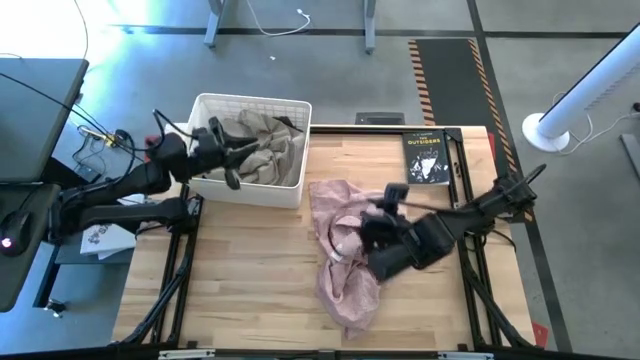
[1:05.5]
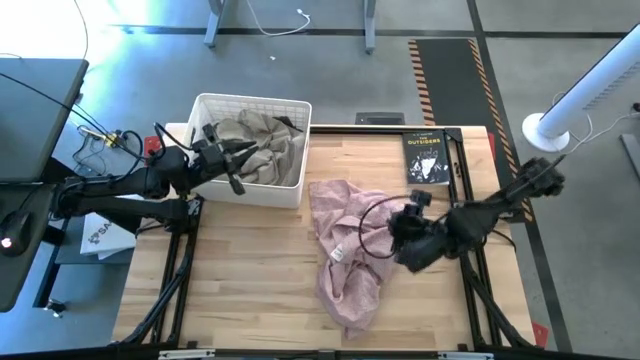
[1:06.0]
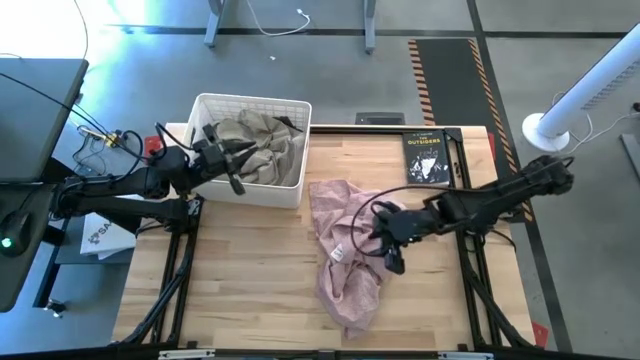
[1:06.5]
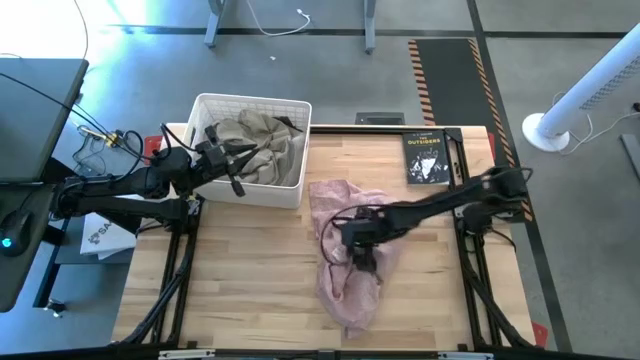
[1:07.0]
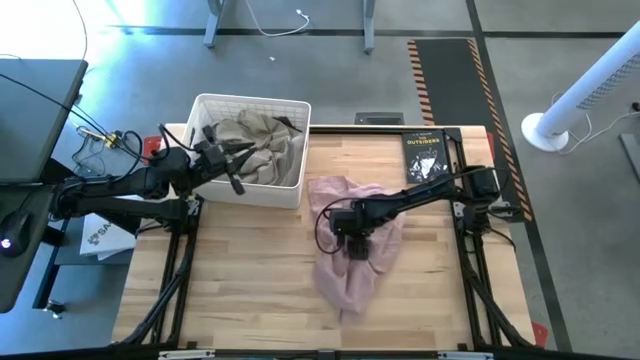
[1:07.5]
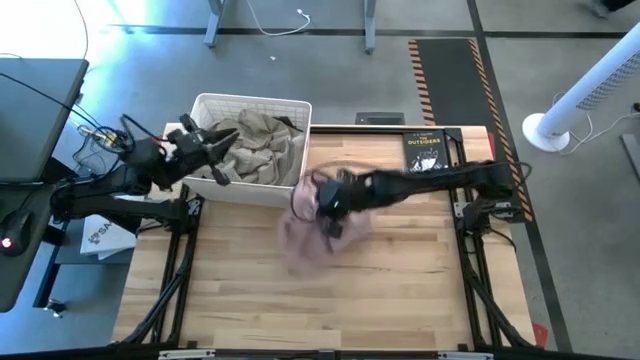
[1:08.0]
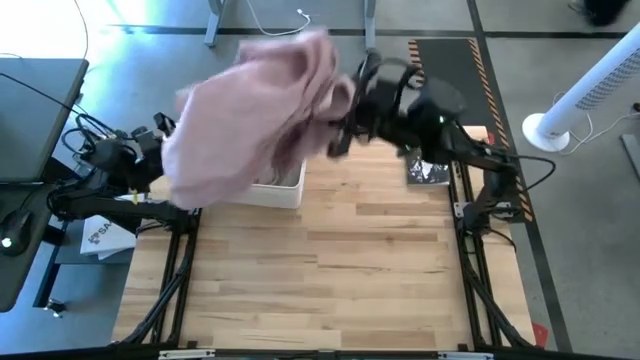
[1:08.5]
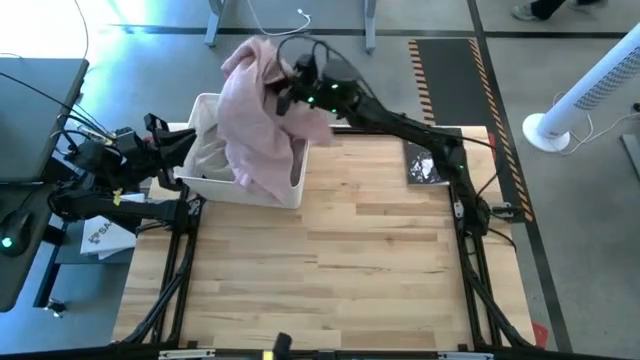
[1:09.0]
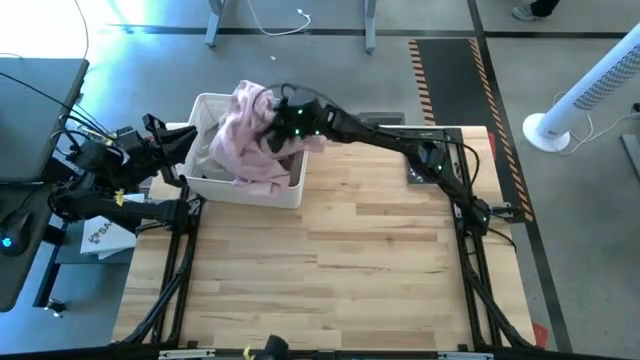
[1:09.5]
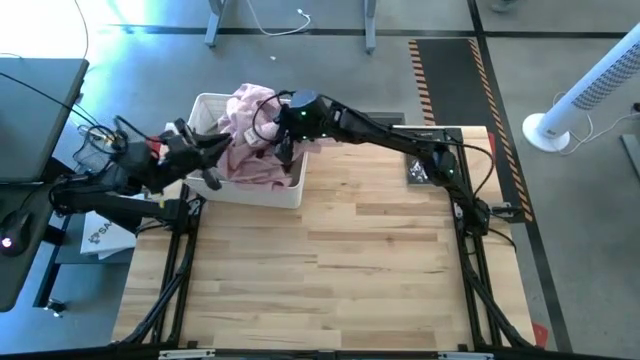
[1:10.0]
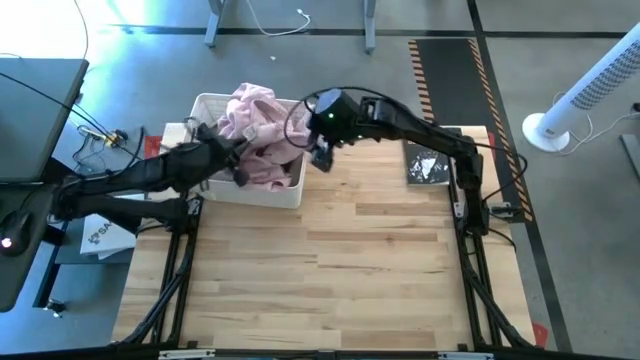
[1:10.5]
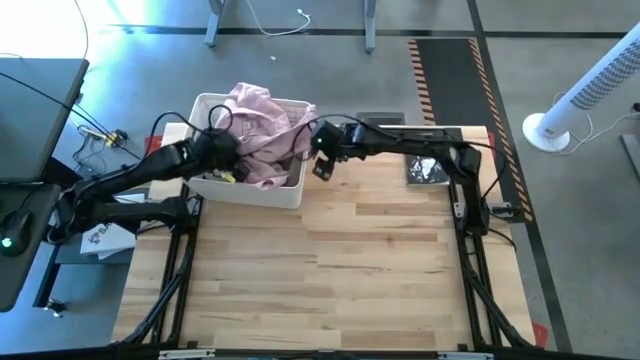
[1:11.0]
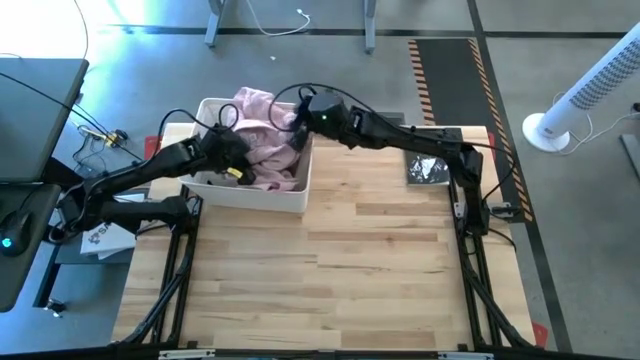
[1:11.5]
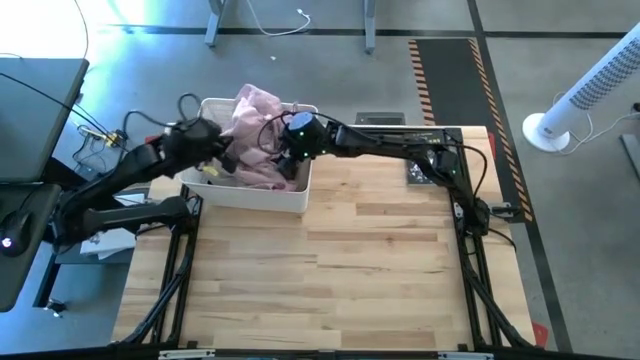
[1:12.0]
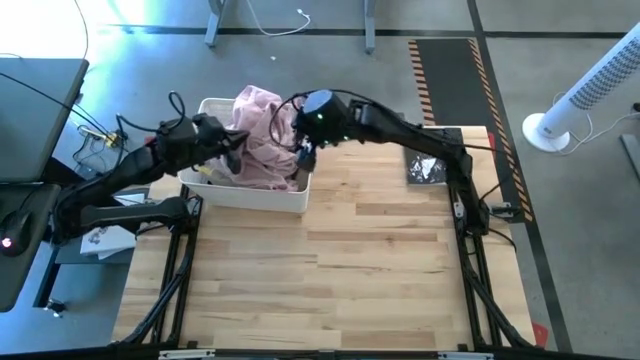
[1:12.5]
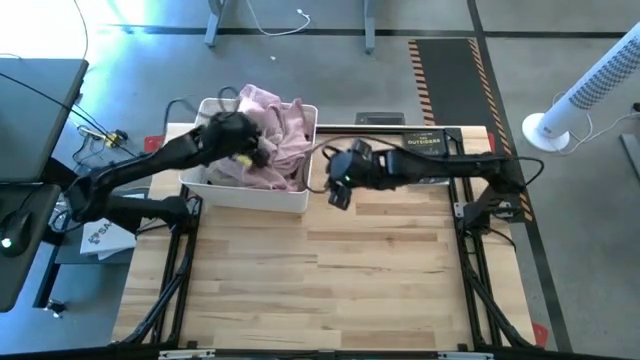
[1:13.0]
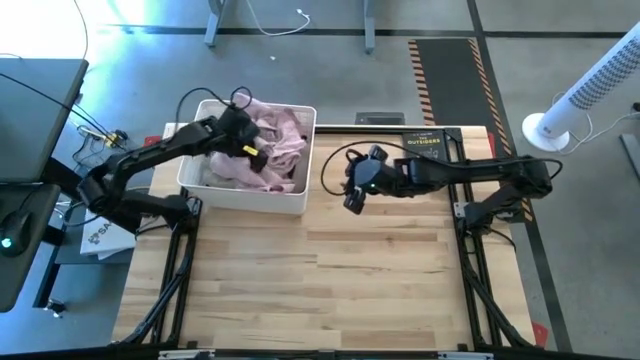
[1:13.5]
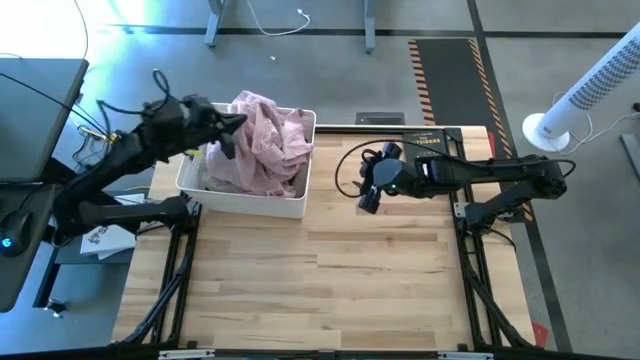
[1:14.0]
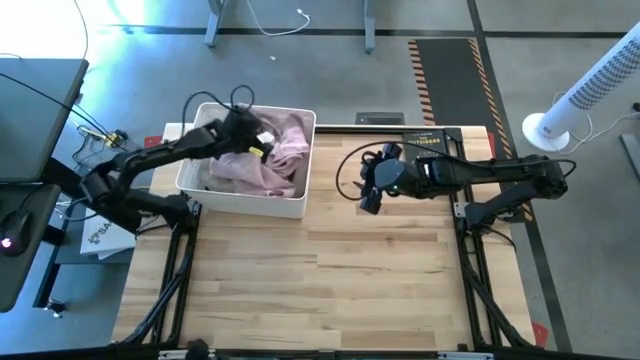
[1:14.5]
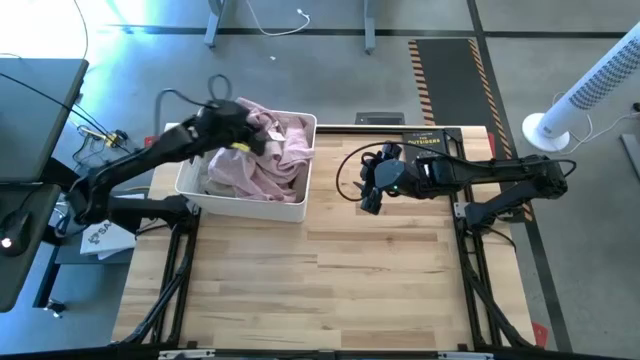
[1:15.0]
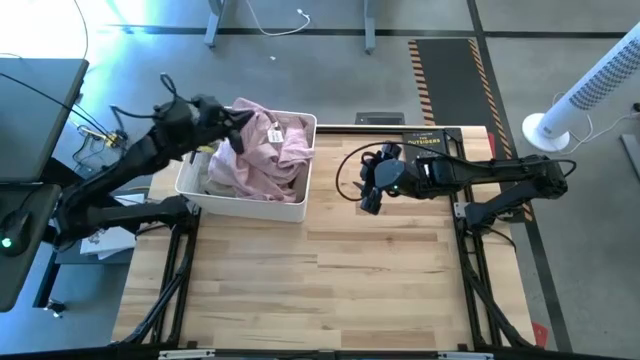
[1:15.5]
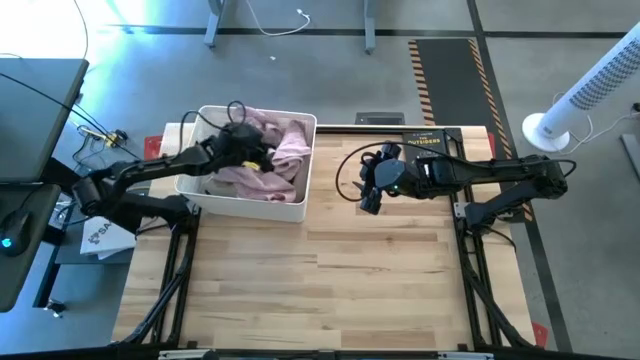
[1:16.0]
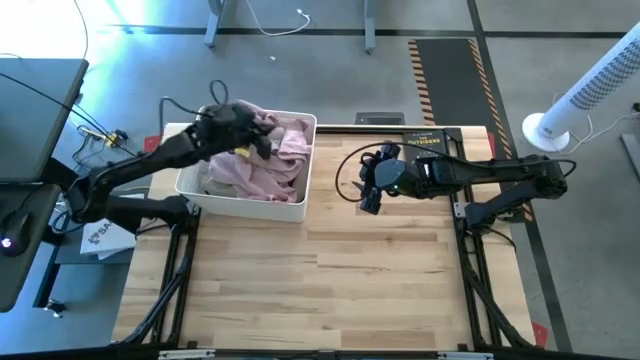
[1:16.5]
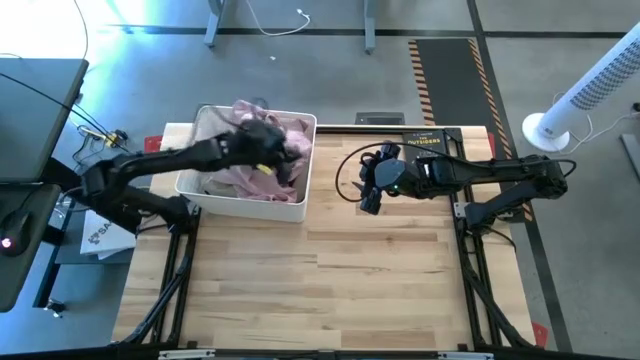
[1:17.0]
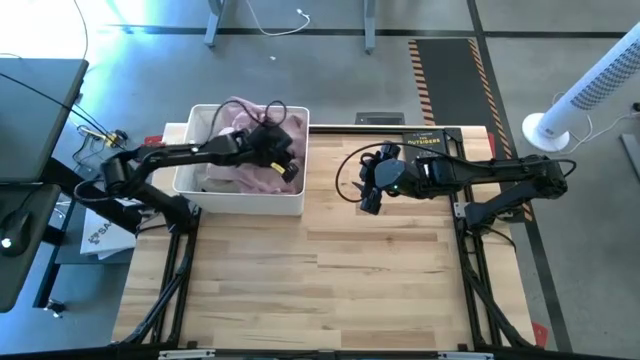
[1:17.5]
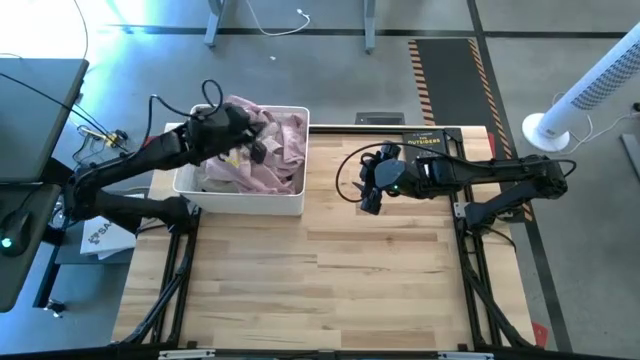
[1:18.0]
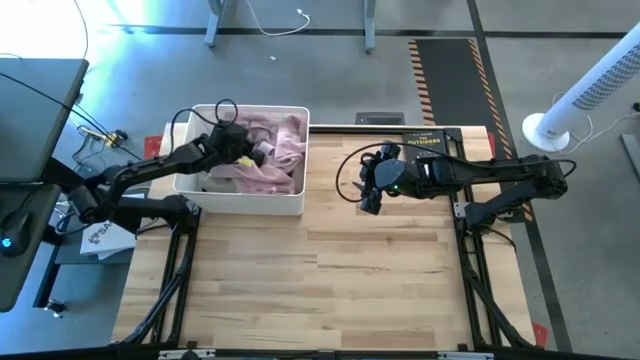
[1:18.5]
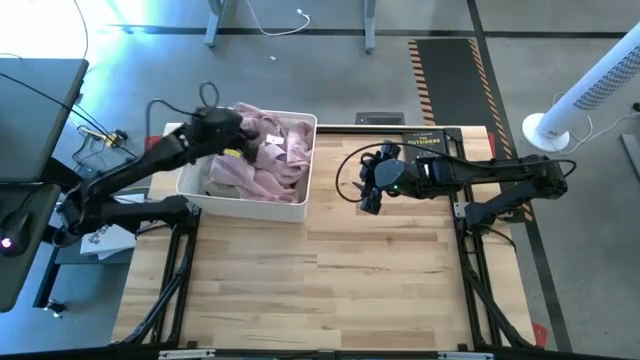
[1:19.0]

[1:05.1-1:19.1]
Task: Sort clothes
Put the pink polo shirt into the laundry bin

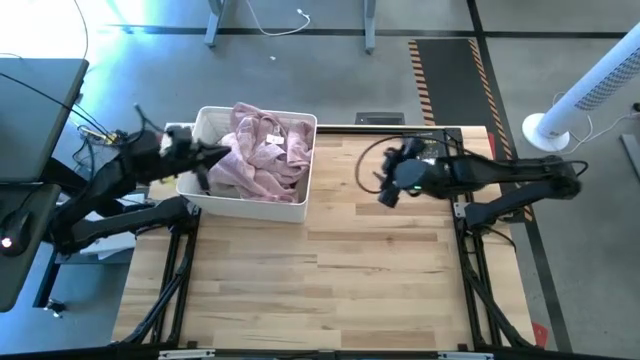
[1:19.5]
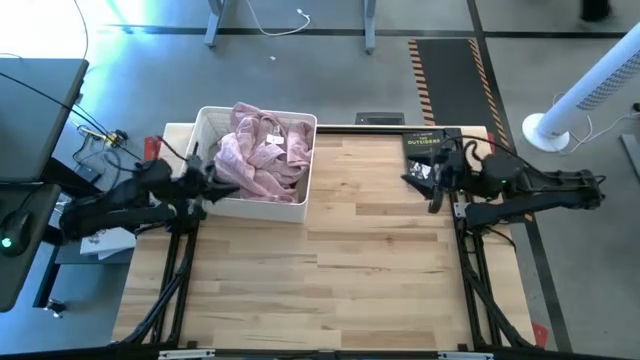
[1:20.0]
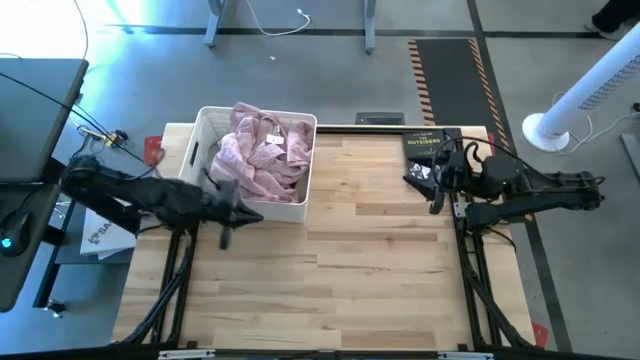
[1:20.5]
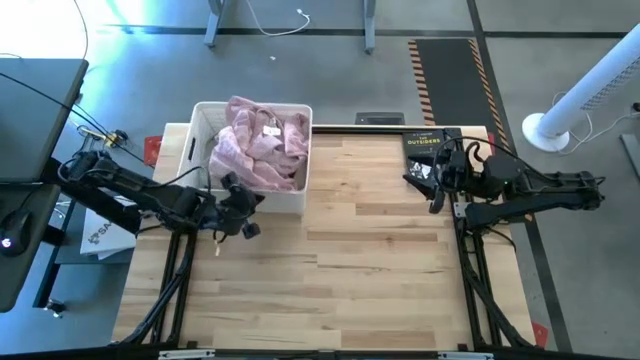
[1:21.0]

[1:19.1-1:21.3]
Adjust the laundry bin

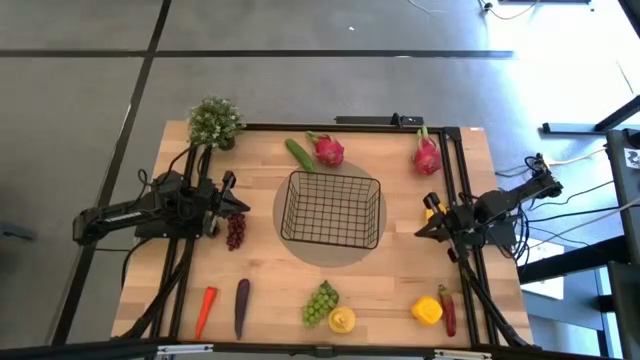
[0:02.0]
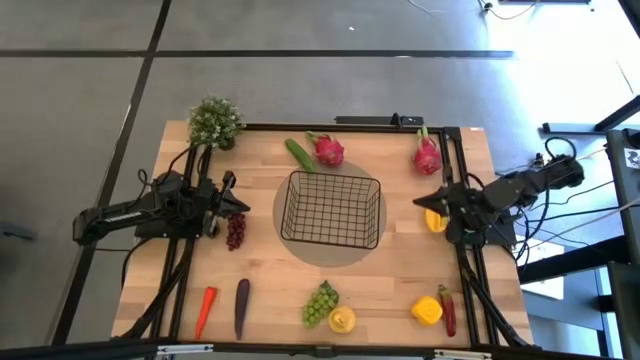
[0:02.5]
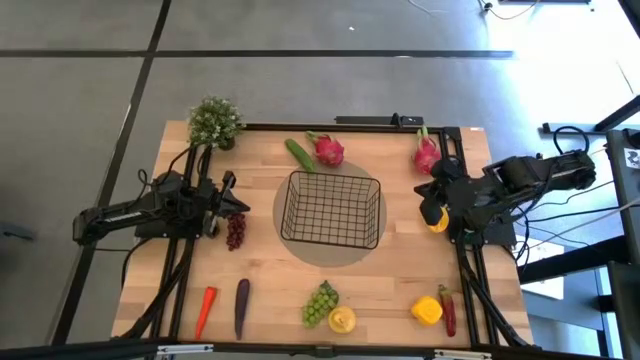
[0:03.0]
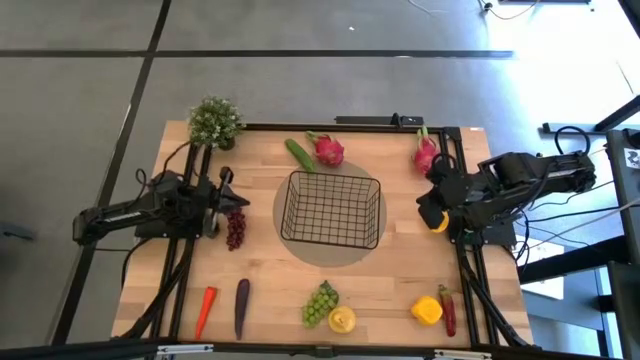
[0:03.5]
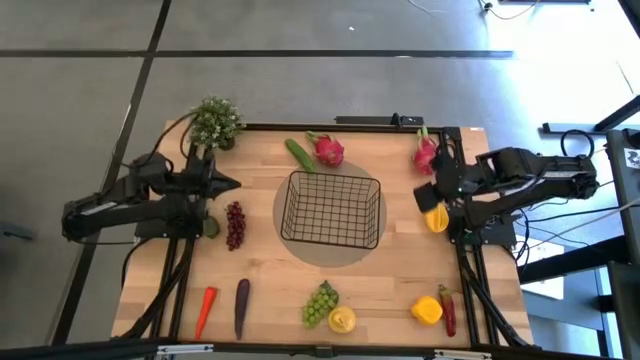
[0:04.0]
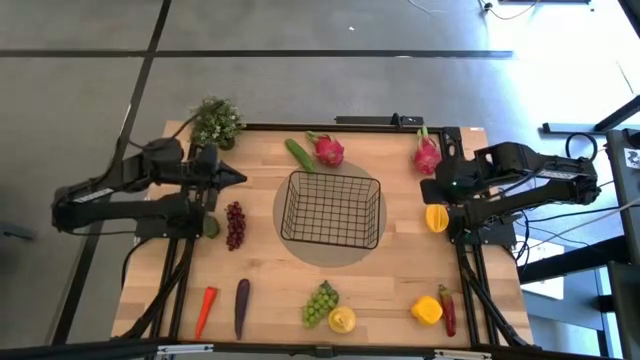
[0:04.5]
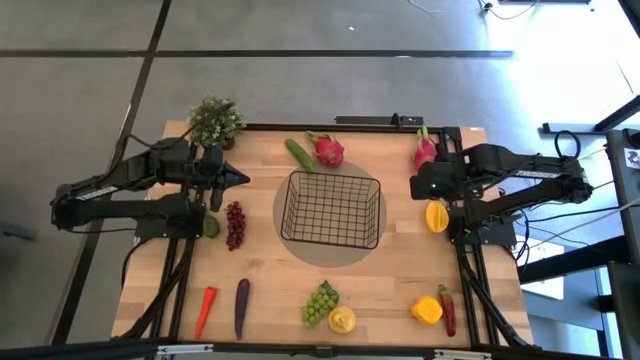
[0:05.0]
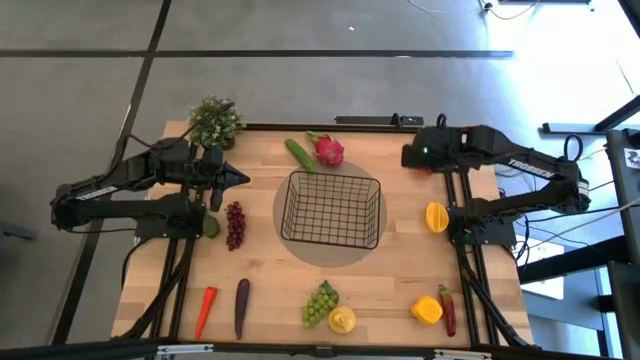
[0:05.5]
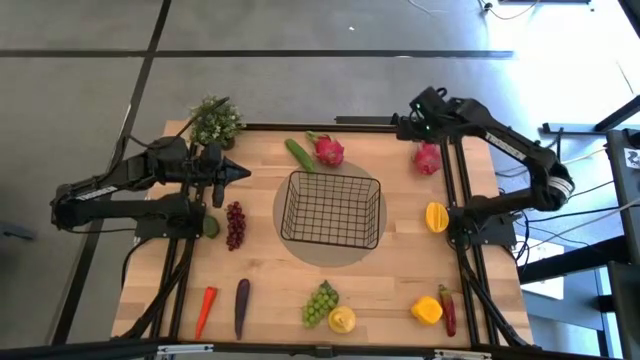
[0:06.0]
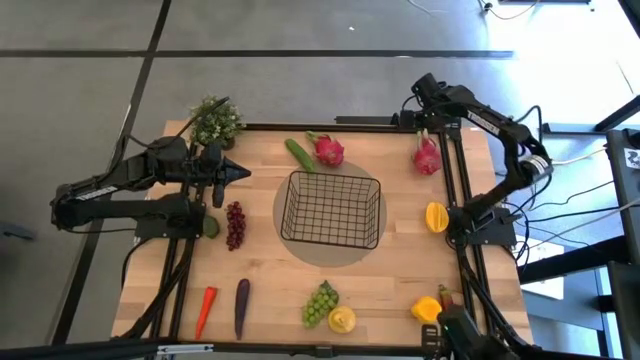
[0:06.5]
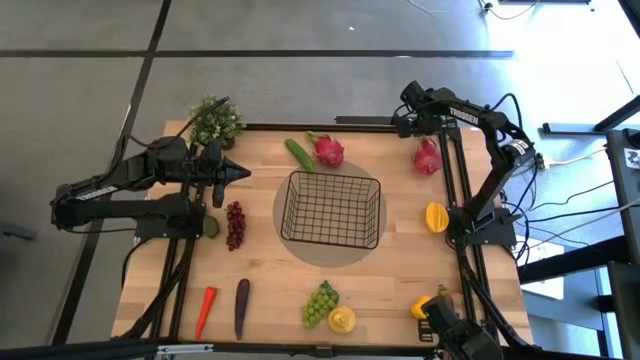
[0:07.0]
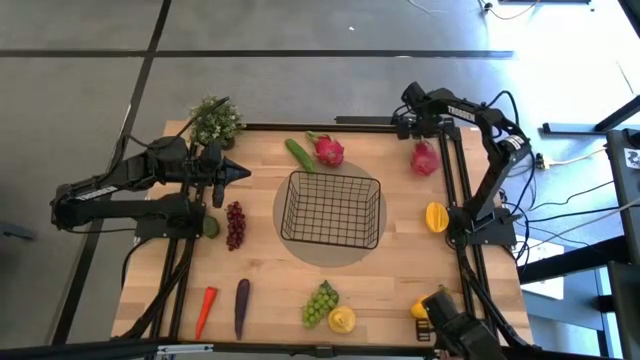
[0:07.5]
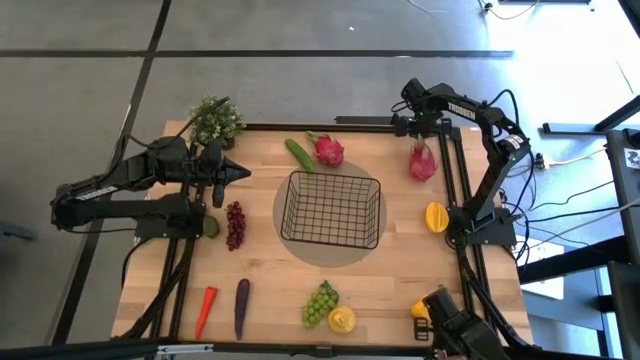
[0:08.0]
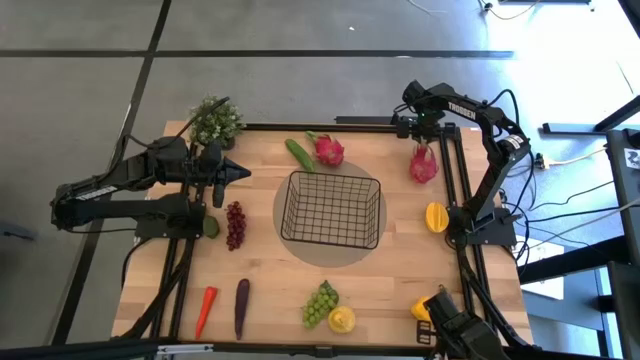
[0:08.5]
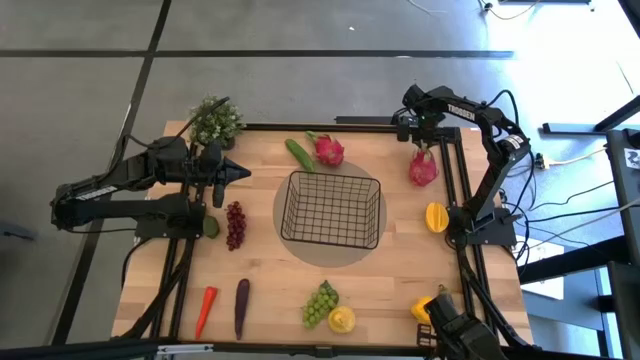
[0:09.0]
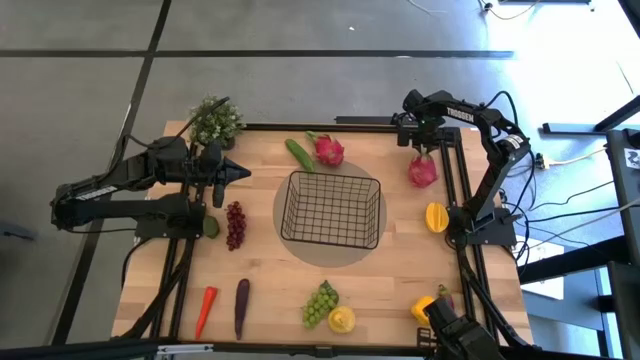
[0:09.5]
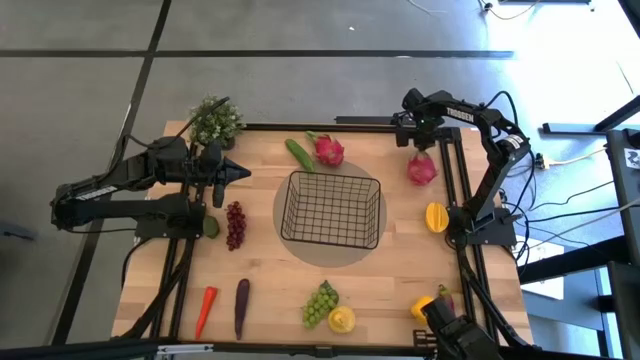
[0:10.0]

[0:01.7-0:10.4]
Task: Build produce basket
Put the right pink dragon fruit into the black wire basket
